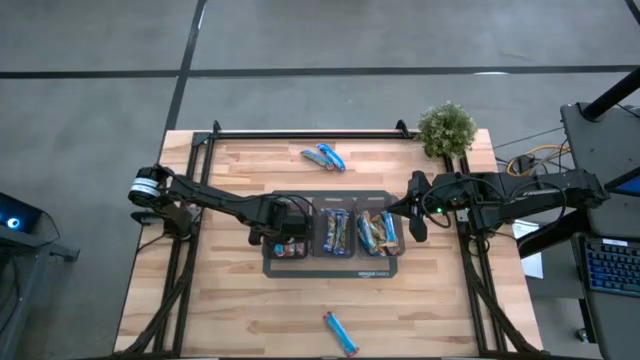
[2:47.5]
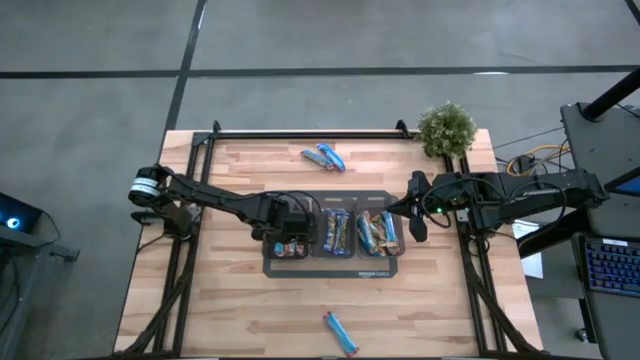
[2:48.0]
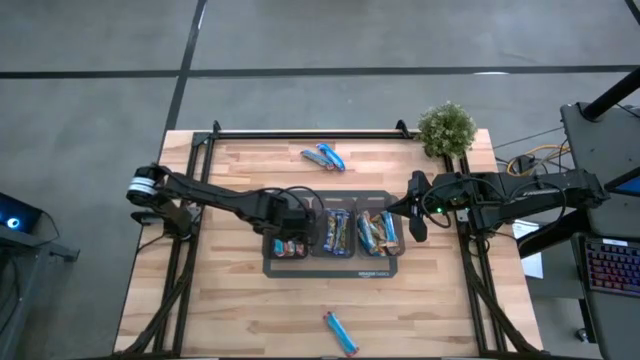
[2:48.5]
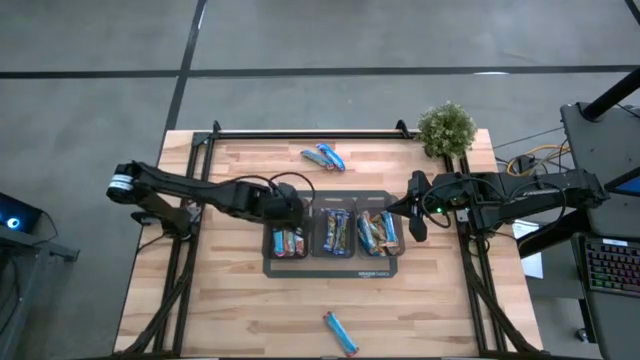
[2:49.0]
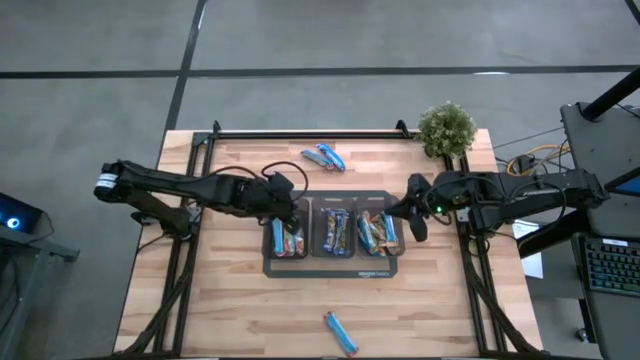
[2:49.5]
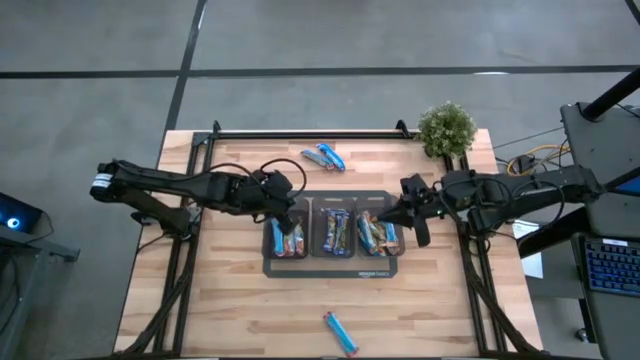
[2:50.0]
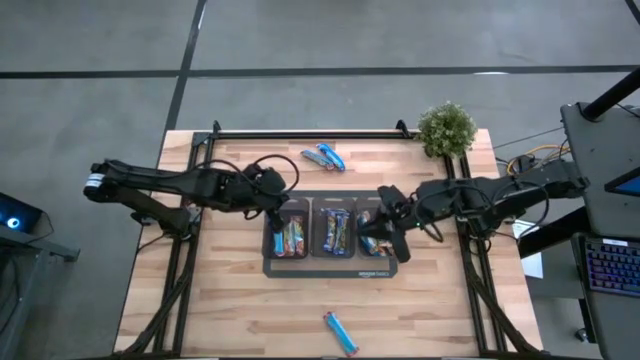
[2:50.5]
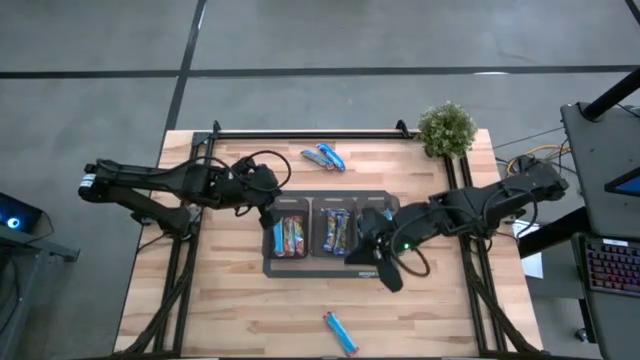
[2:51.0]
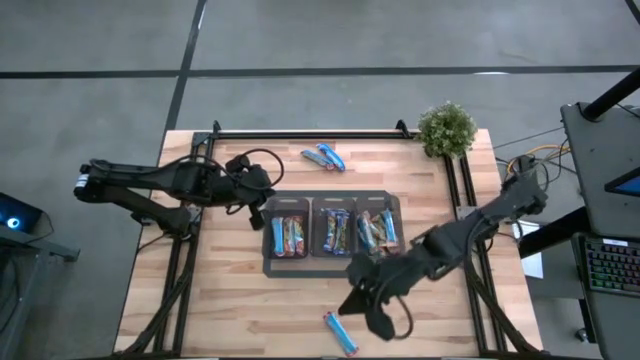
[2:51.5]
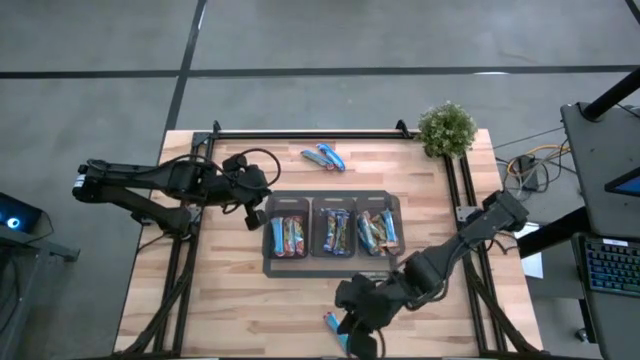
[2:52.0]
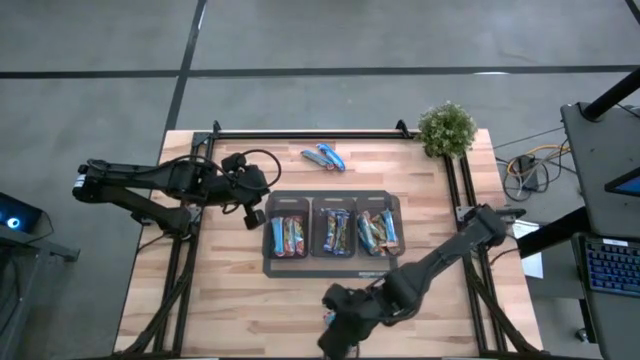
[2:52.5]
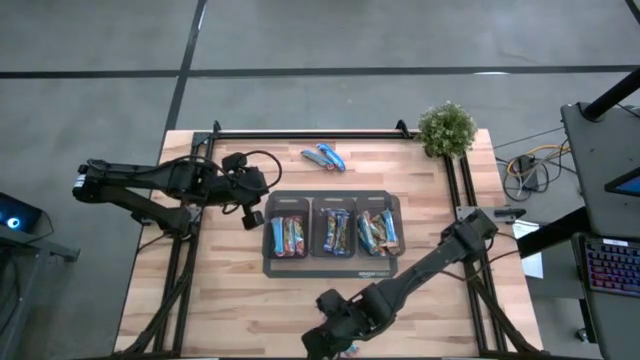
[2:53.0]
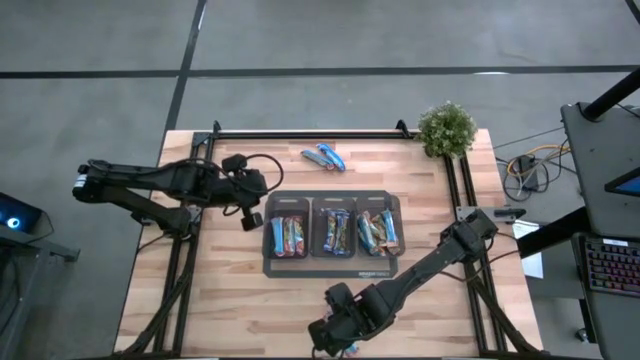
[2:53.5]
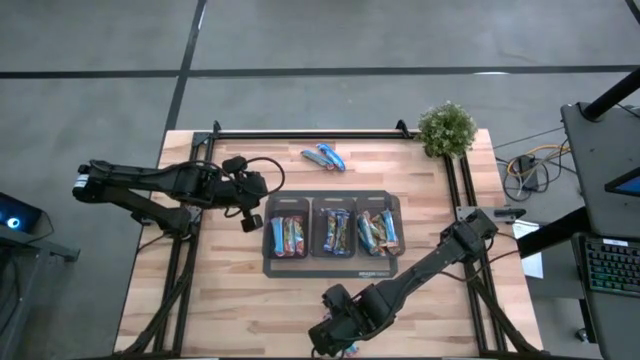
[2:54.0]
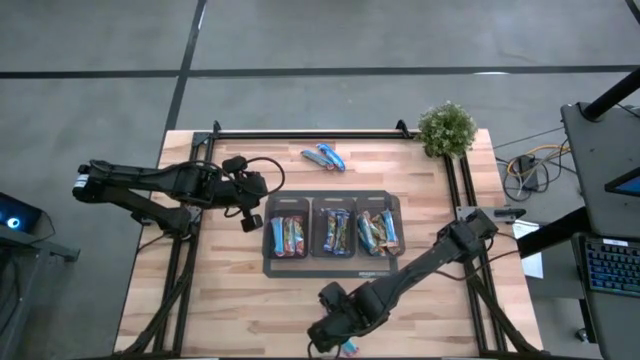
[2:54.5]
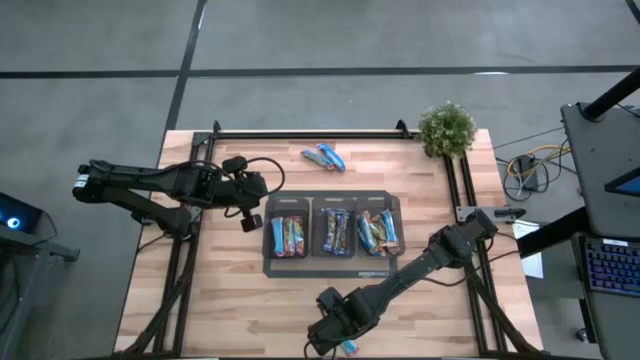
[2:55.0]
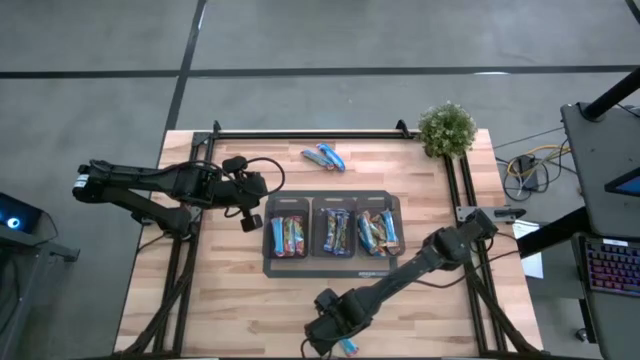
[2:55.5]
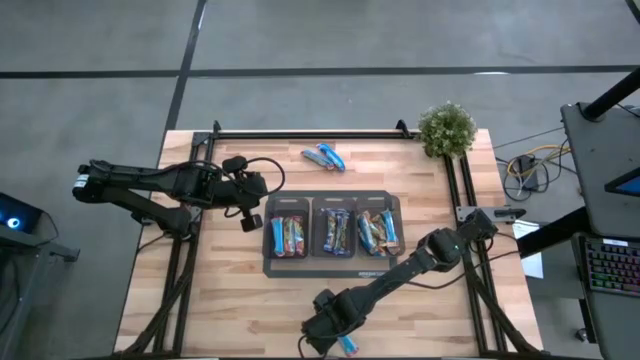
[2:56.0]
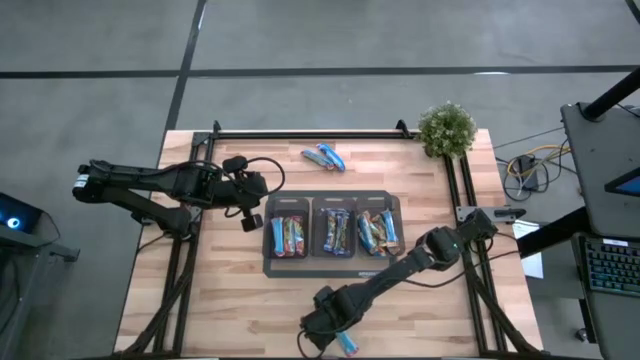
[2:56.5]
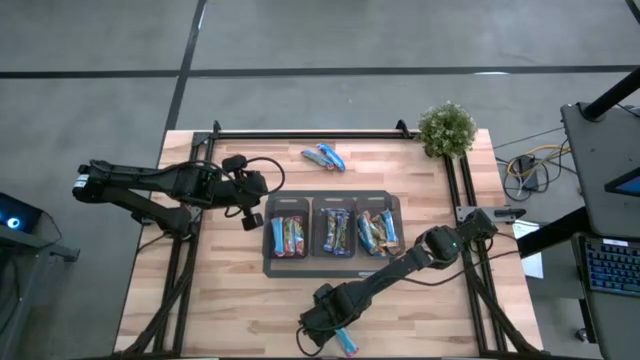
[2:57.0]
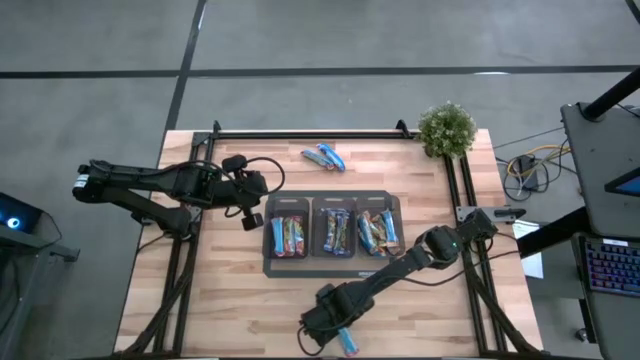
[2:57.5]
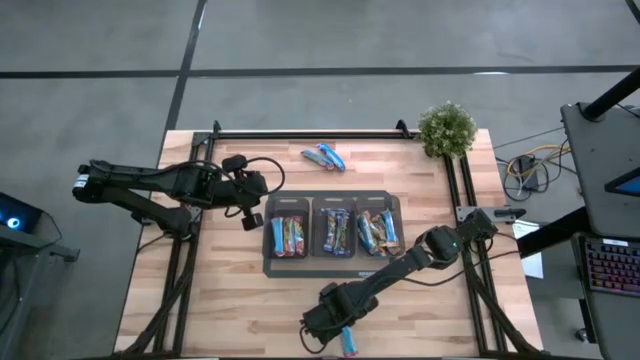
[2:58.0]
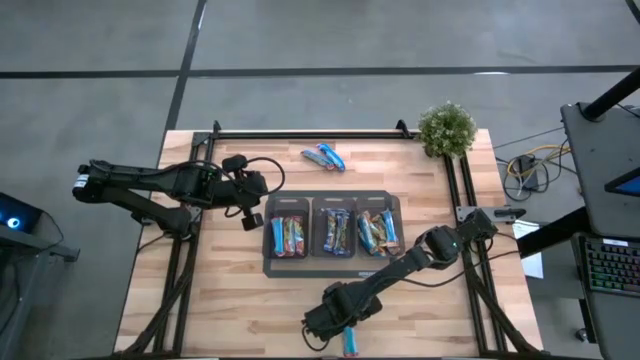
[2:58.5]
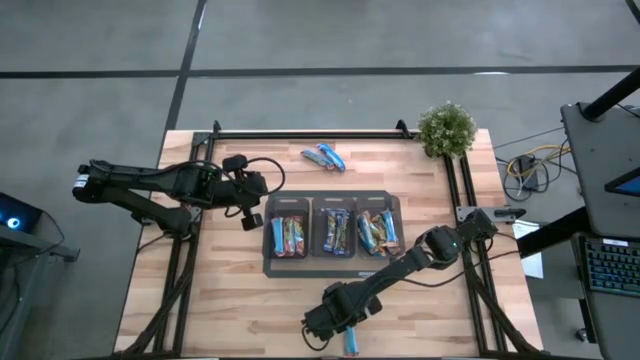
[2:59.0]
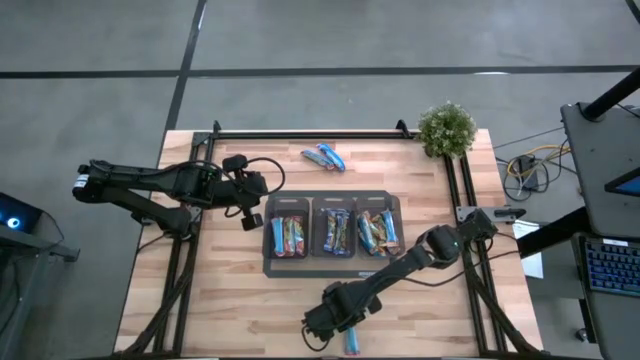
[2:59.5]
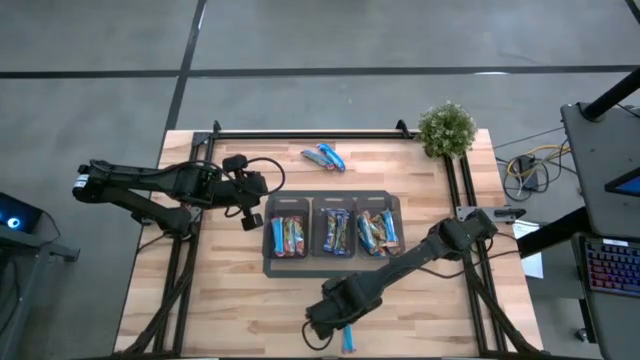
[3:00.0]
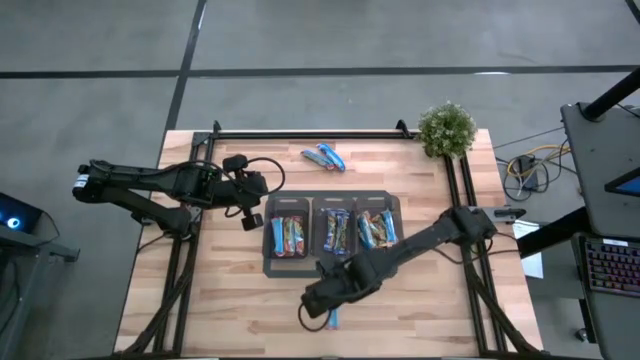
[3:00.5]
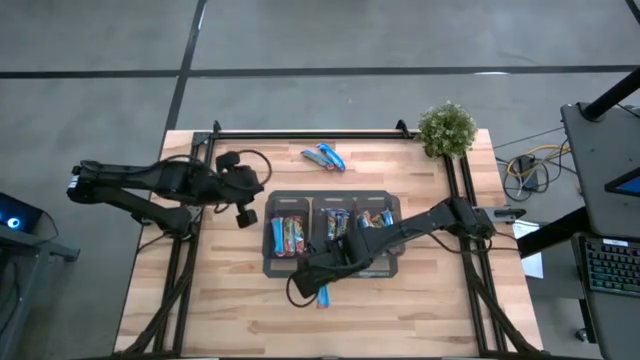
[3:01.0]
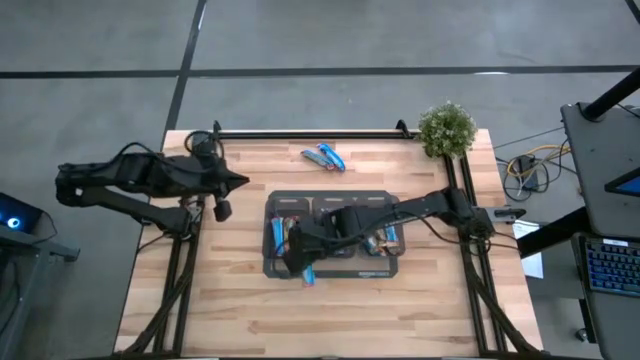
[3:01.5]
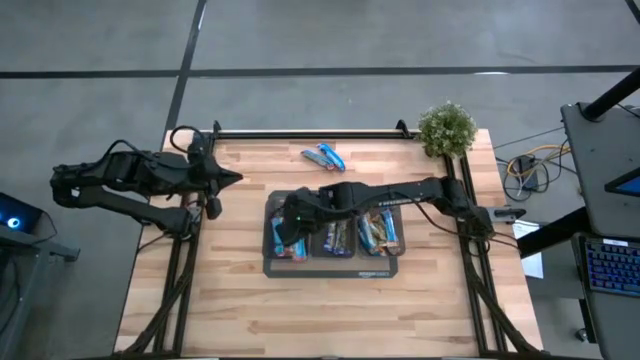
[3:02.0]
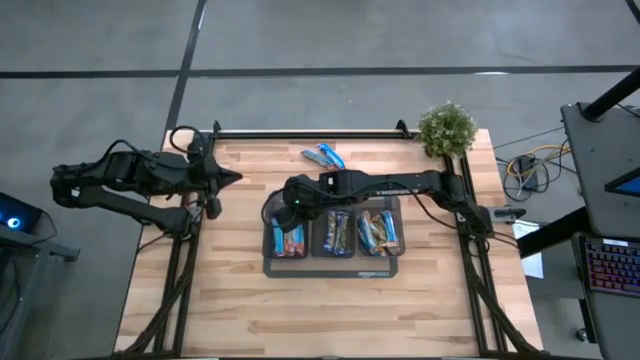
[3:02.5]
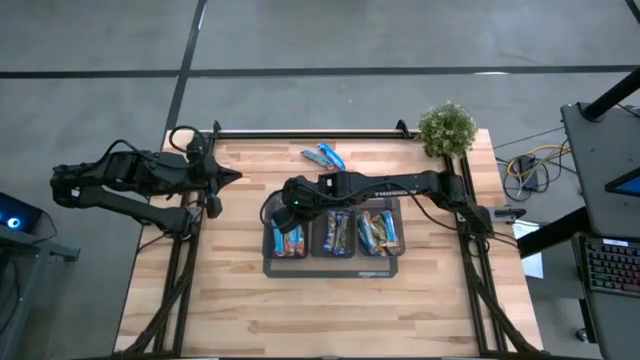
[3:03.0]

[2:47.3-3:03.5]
Task: Pick and place Granola Bars by type
Put the red granola bar into the left black bin

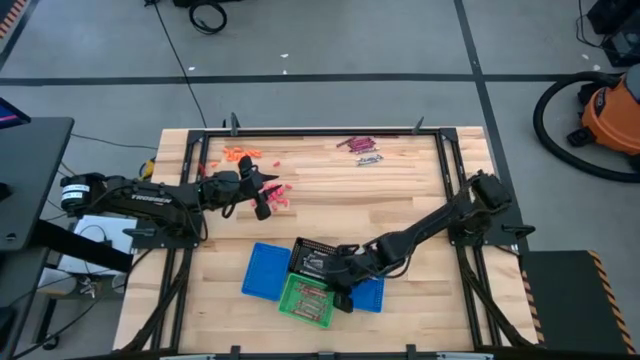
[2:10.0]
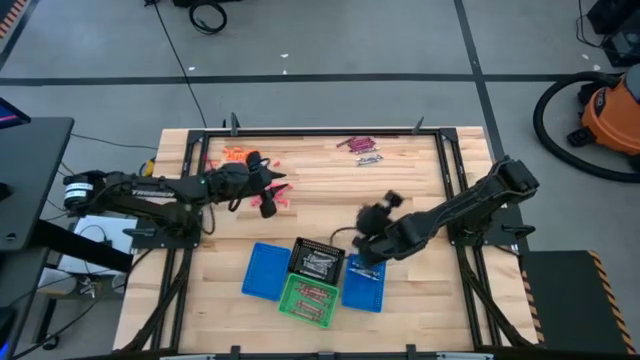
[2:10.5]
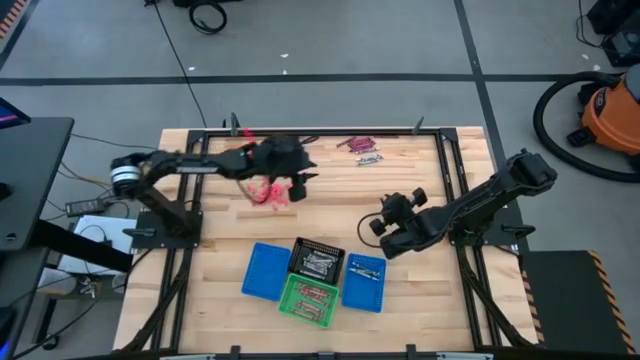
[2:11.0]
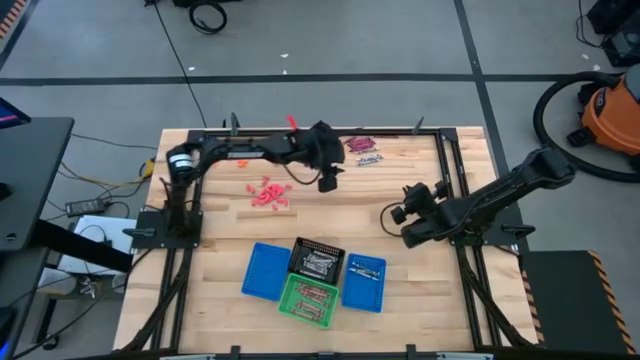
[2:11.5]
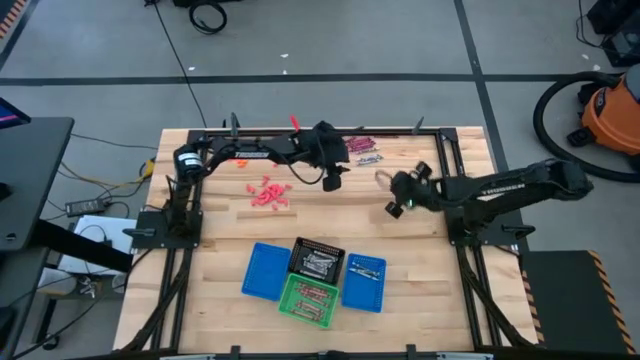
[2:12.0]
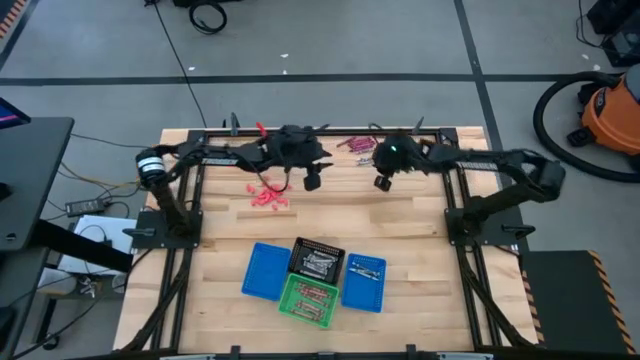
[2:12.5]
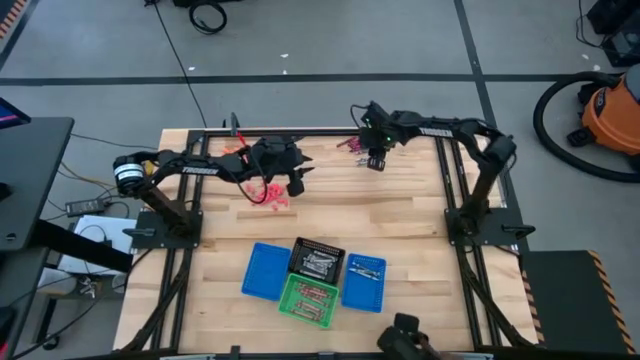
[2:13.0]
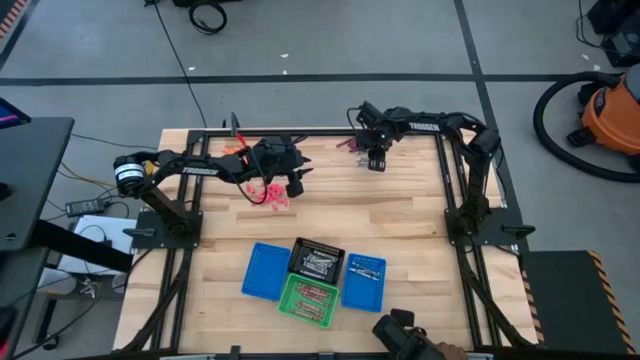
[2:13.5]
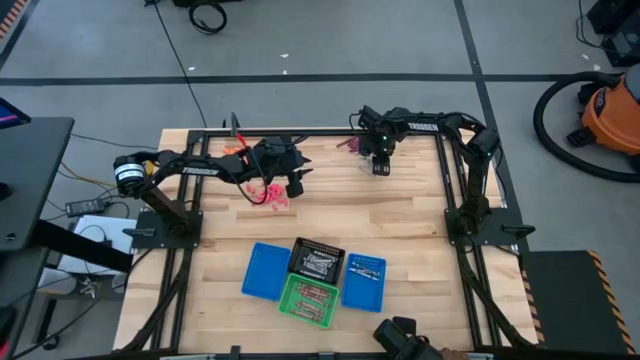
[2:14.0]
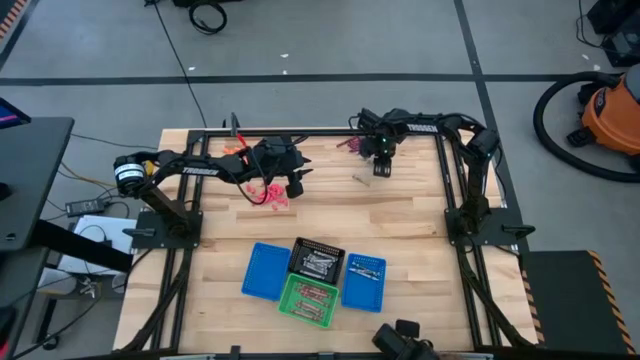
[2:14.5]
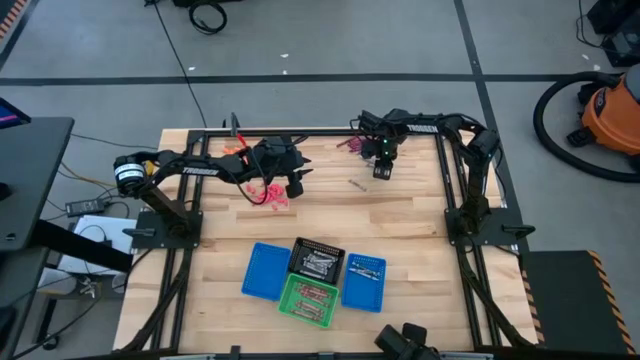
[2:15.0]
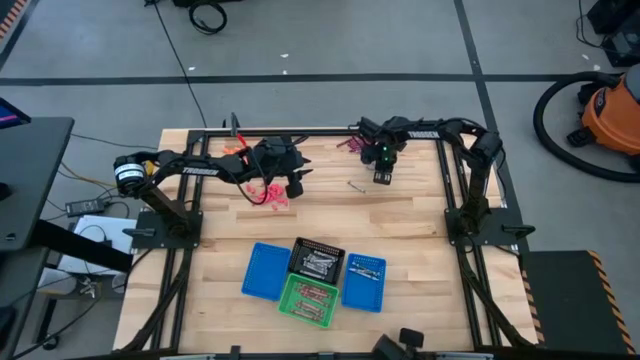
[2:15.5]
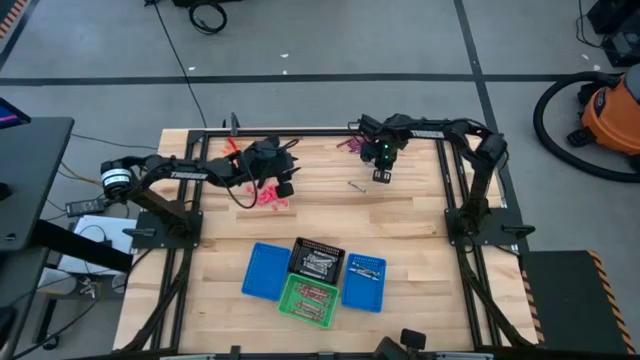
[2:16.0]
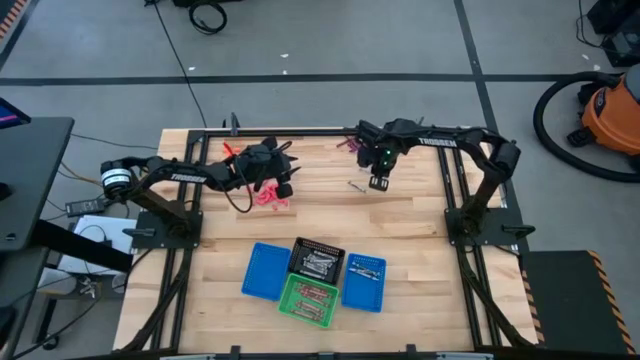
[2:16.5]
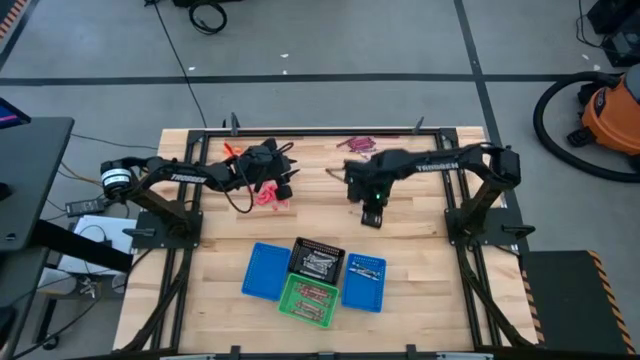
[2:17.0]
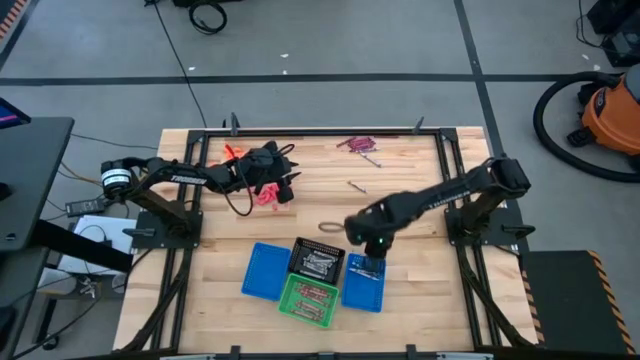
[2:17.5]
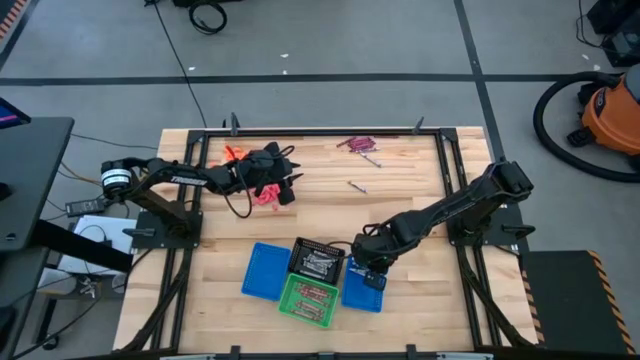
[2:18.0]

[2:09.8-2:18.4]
Task: Sort crayons
Put the white crayon into the right blue bin
